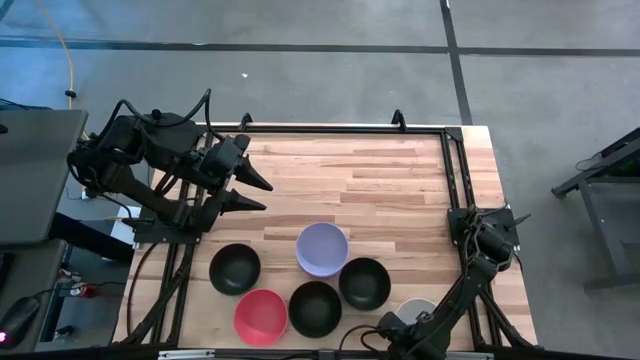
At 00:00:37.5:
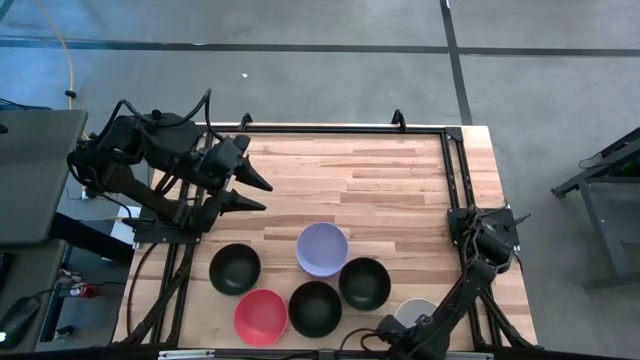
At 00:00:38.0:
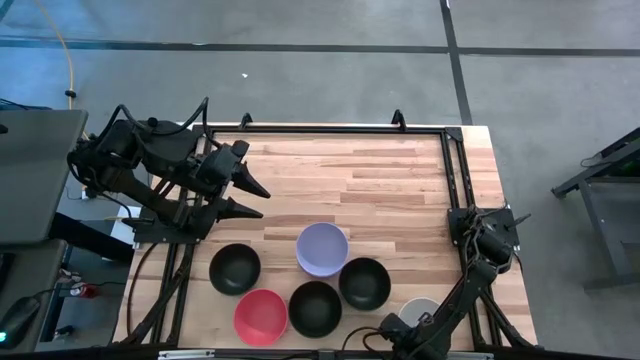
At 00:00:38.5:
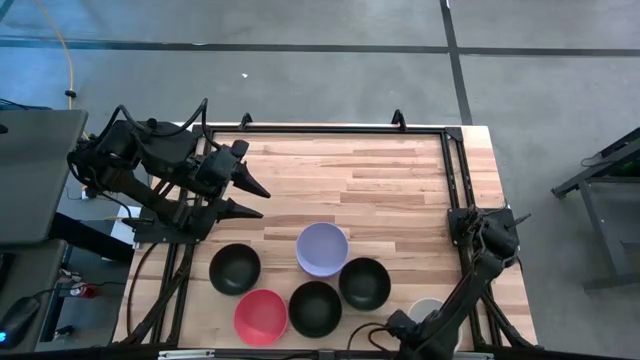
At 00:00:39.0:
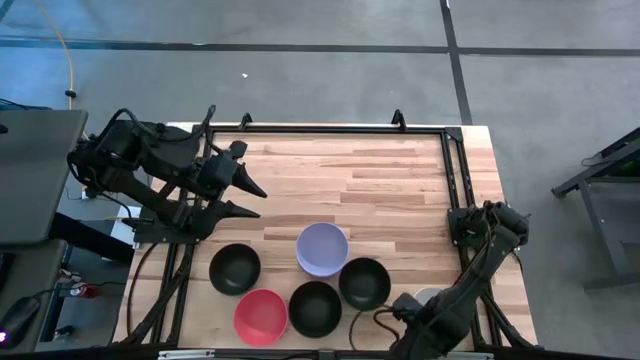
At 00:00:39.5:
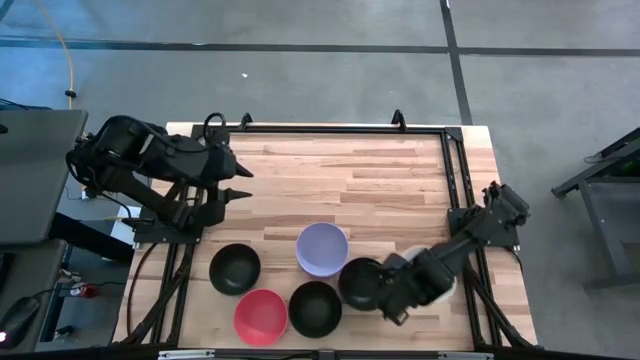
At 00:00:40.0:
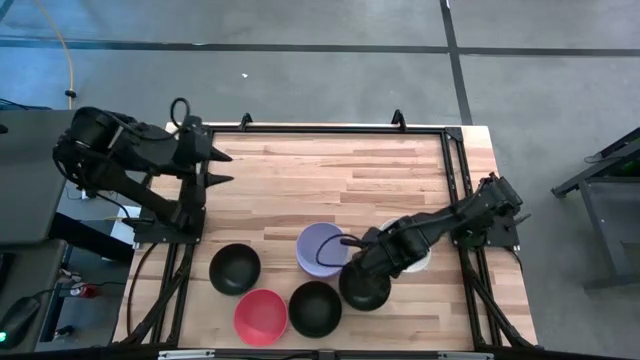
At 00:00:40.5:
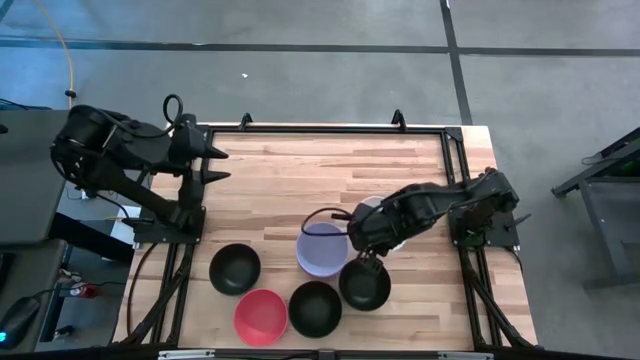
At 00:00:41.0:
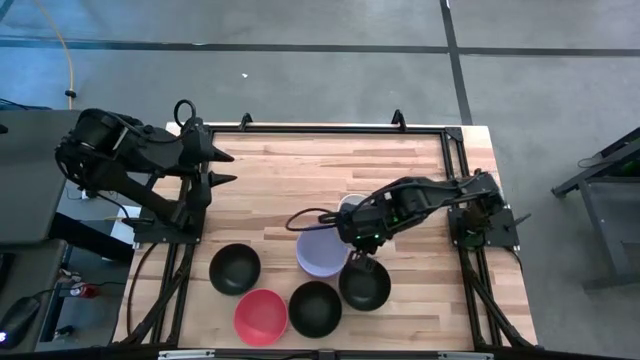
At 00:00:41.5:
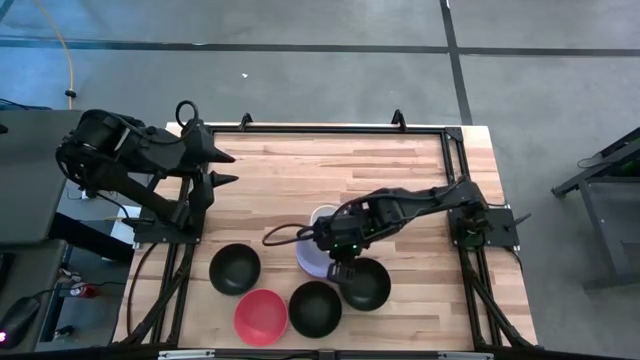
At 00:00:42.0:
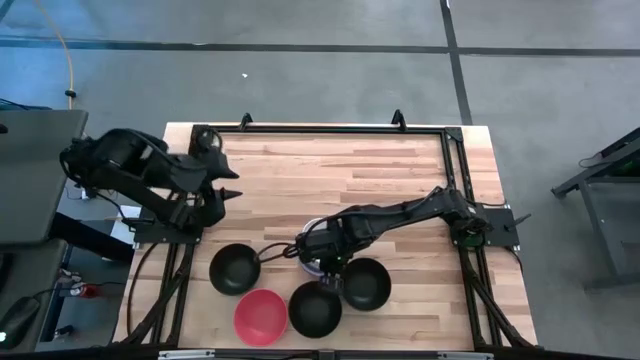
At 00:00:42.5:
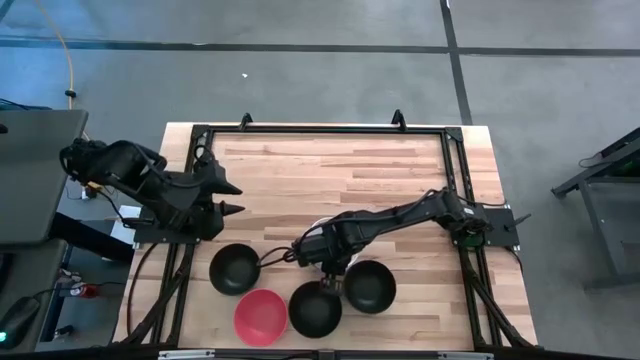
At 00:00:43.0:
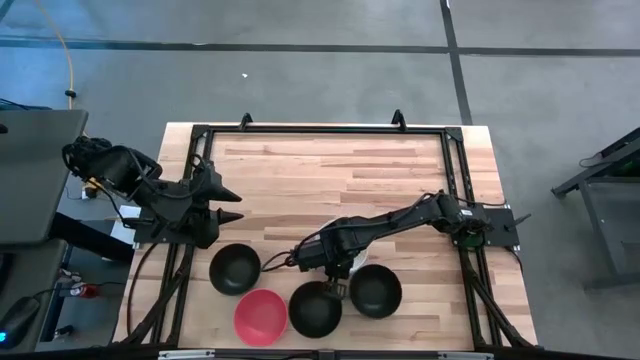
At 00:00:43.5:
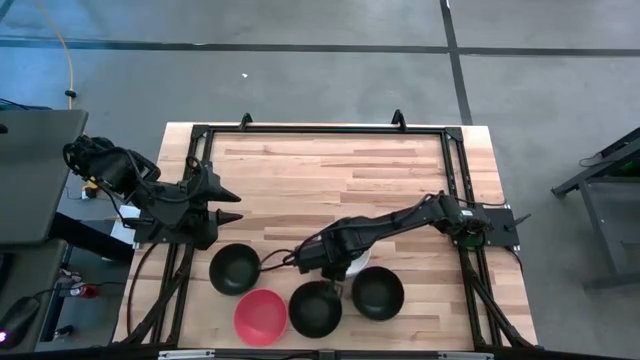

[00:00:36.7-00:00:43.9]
Task: Nest bowls inside each other
Stack the white bowl on the light blue bowl

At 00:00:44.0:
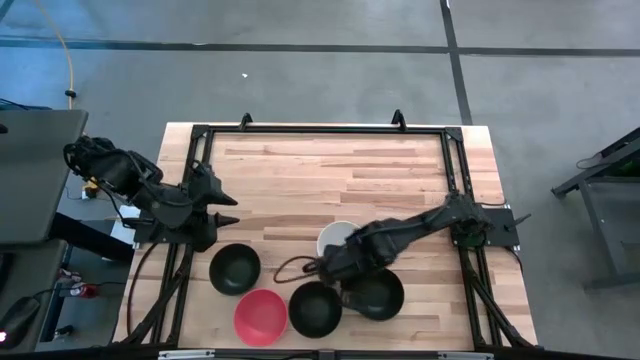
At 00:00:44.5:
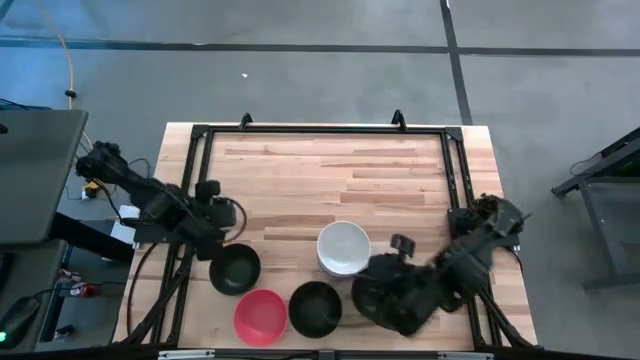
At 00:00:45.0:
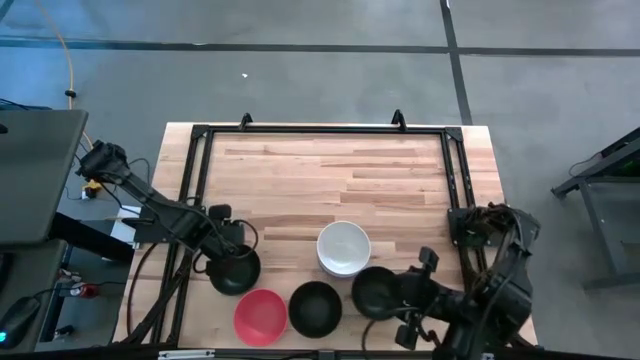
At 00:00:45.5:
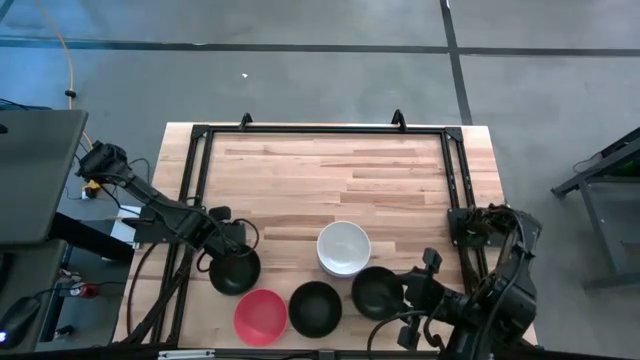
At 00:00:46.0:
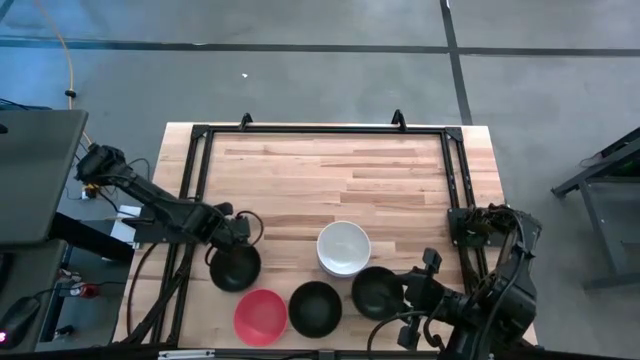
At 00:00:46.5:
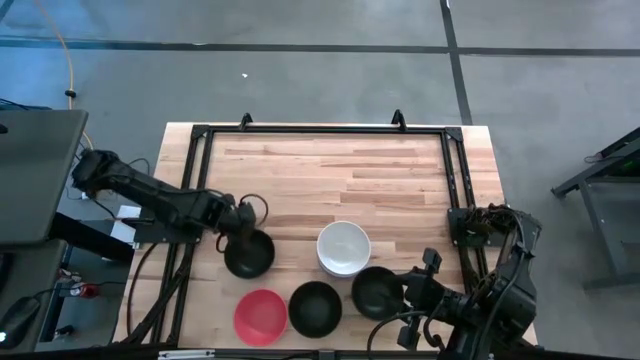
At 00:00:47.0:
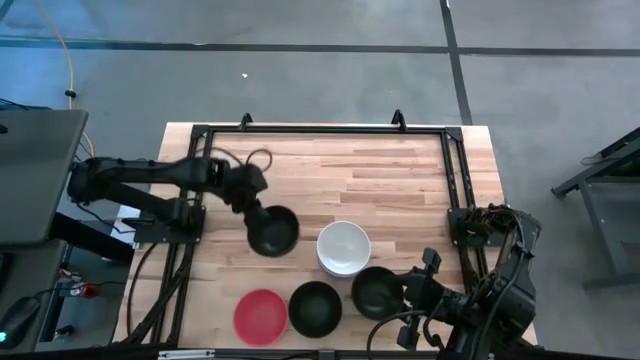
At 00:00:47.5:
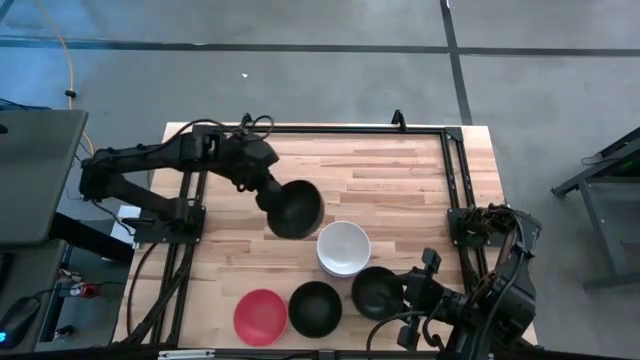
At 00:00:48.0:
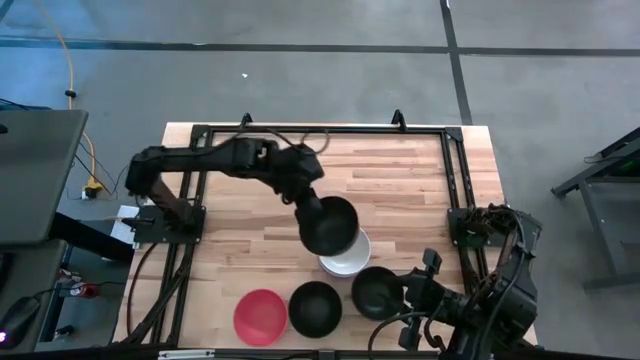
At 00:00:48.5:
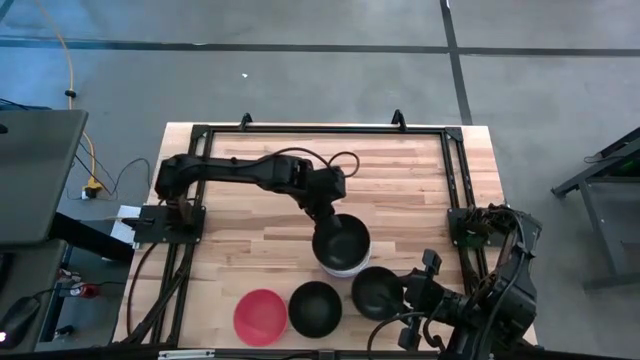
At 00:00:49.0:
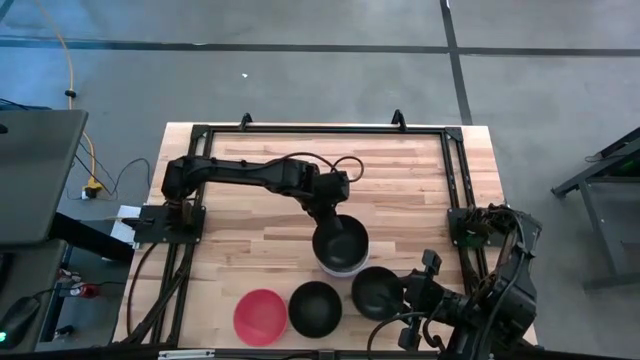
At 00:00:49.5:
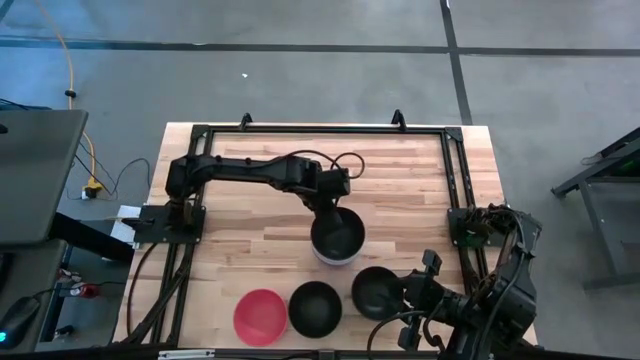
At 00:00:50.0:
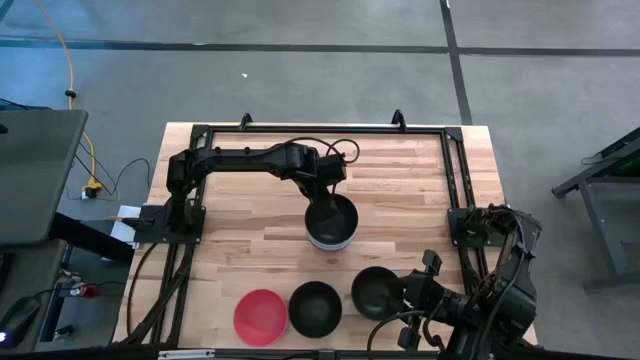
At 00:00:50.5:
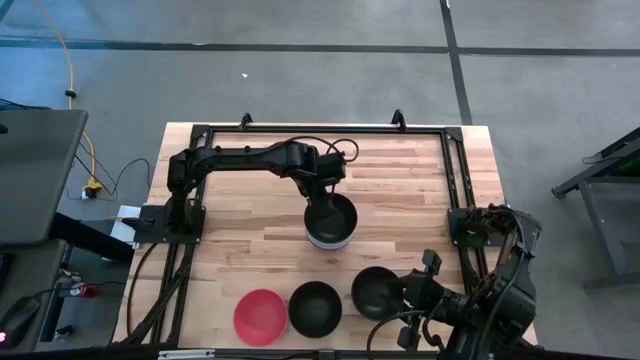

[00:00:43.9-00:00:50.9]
Stack the left black bowl on the white bowl

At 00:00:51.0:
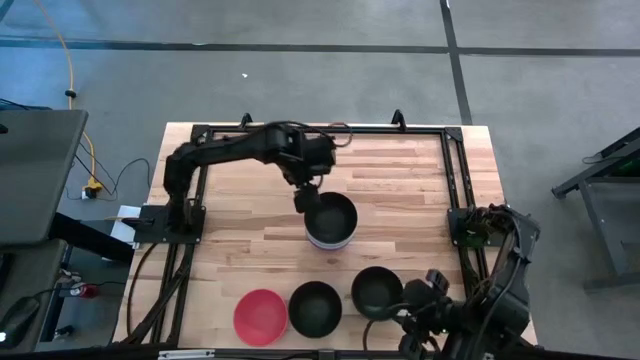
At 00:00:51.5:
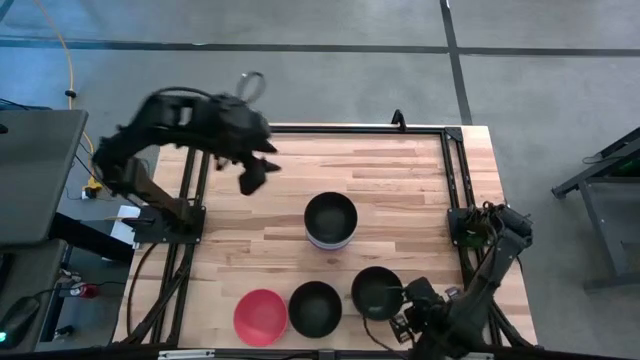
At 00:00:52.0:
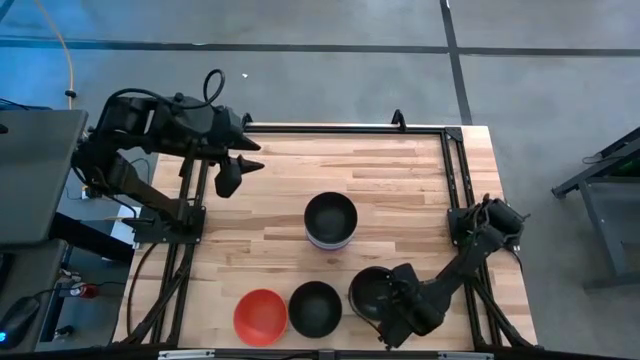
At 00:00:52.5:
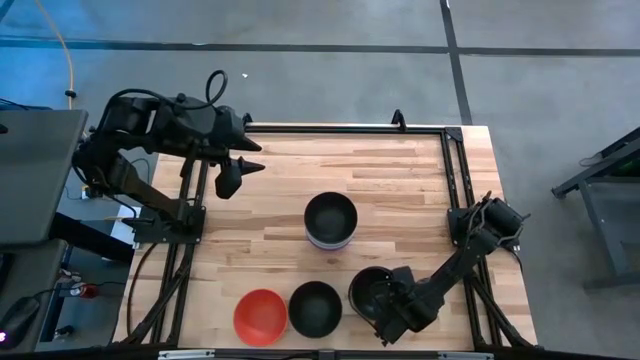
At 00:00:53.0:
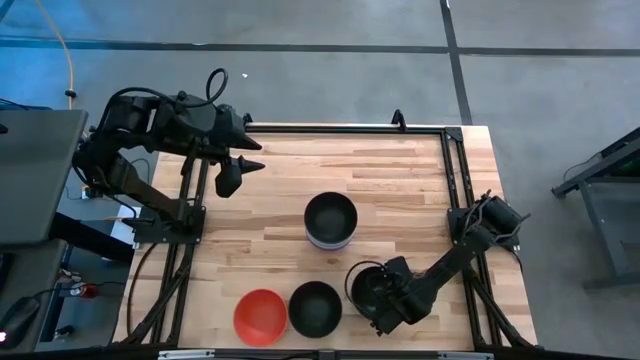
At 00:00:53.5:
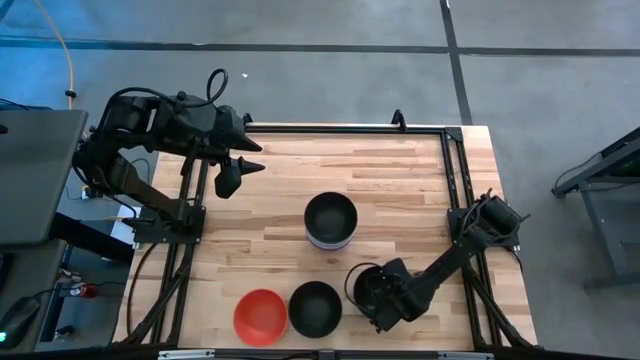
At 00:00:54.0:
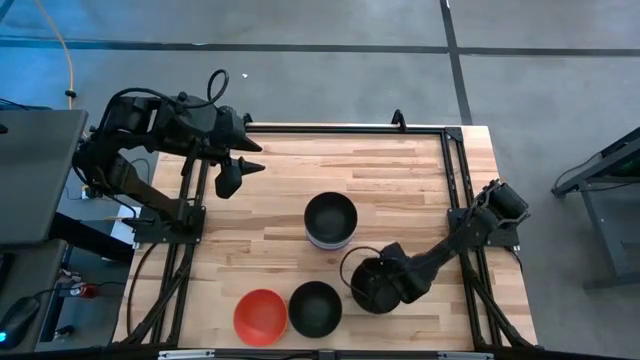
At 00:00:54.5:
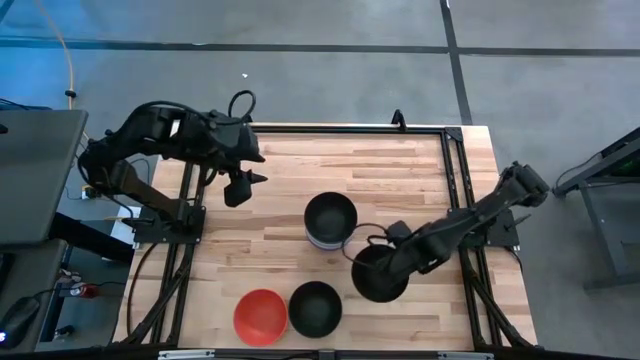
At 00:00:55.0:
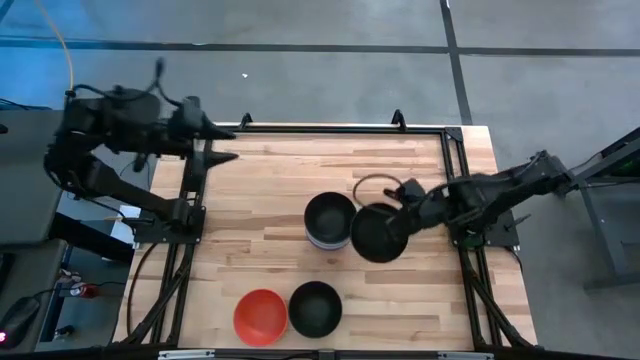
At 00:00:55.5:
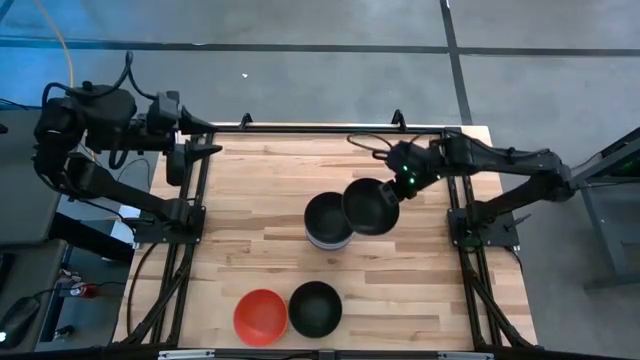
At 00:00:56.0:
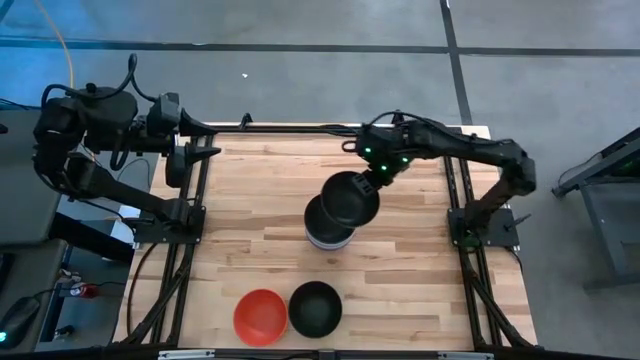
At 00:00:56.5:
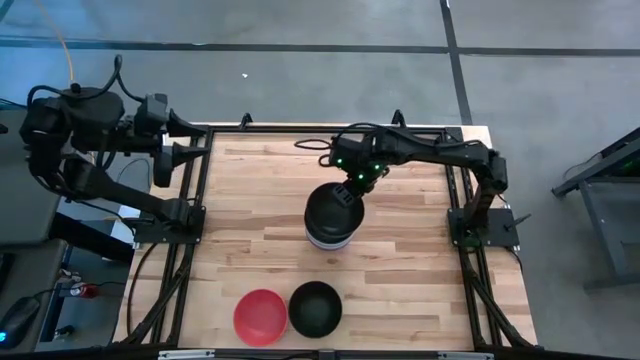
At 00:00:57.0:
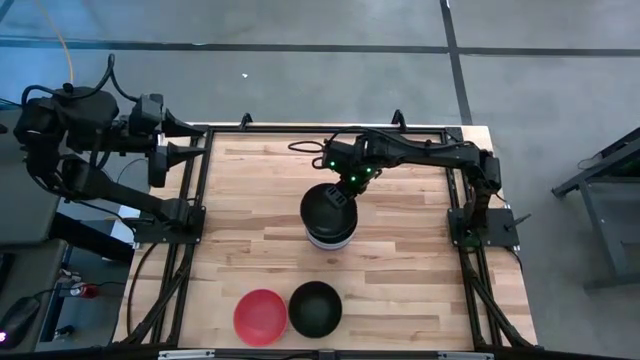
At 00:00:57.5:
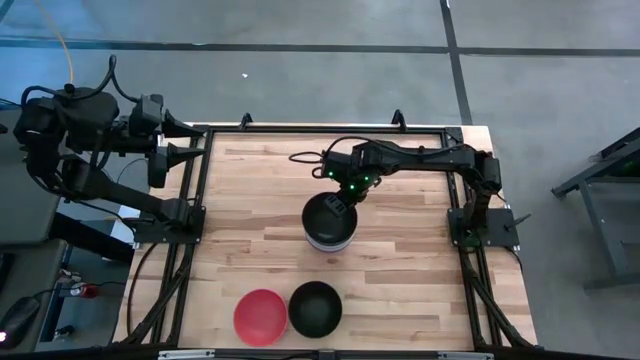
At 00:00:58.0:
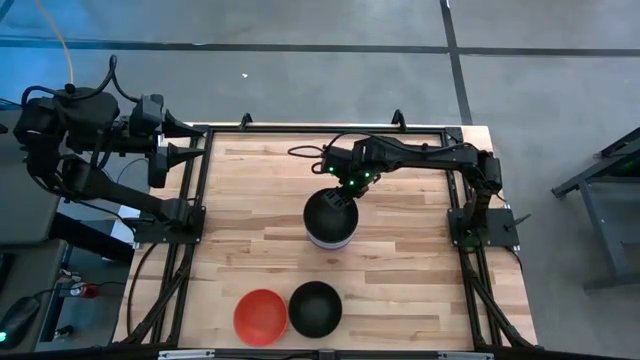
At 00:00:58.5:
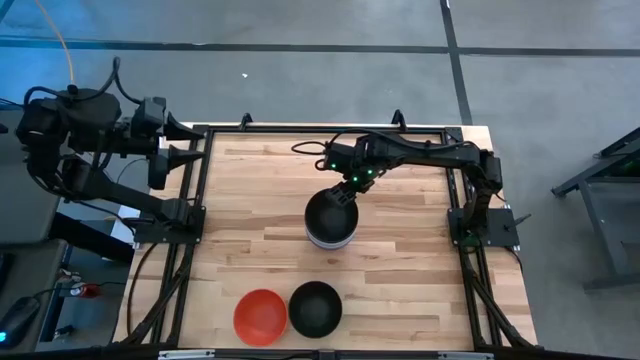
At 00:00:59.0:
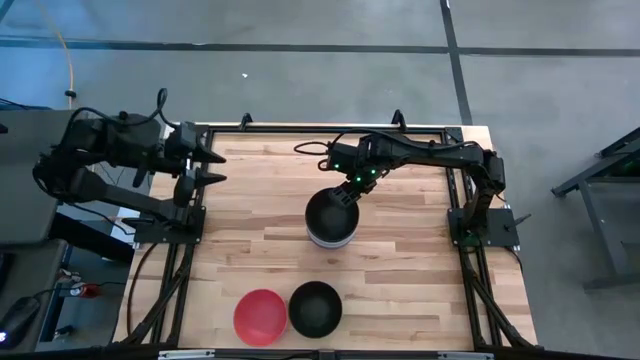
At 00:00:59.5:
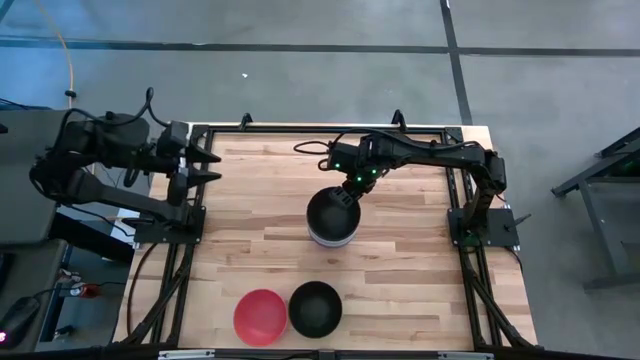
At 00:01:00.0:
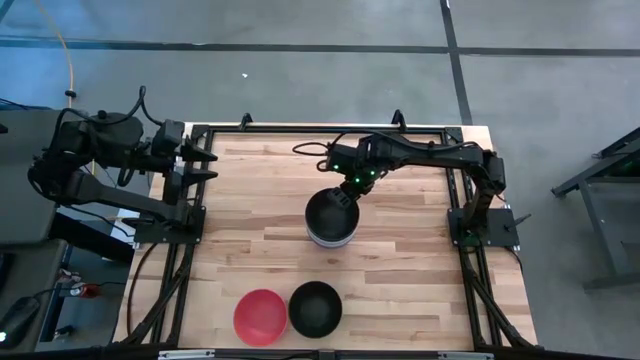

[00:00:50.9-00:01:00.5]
Stack the right black bowl on the black bowl
